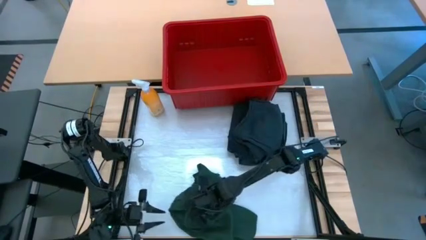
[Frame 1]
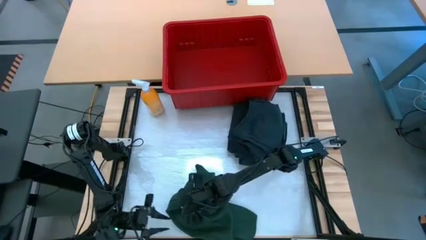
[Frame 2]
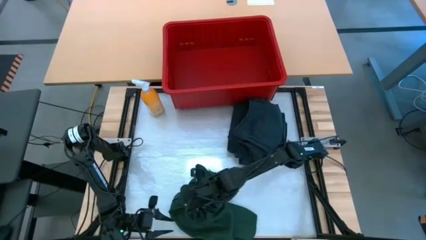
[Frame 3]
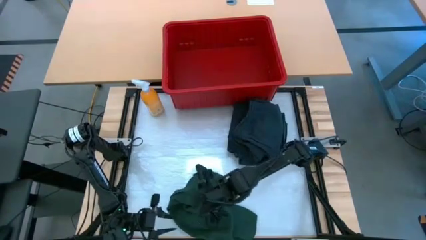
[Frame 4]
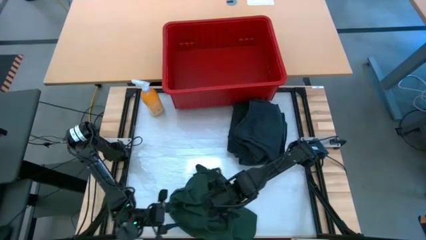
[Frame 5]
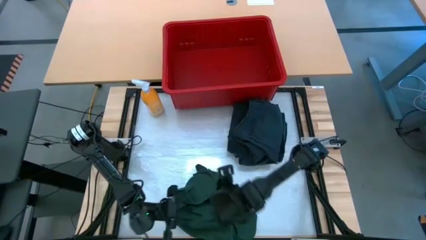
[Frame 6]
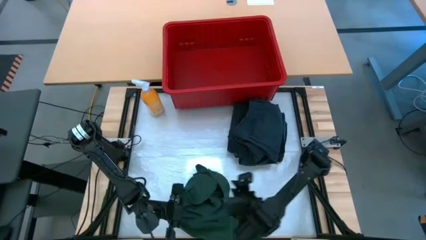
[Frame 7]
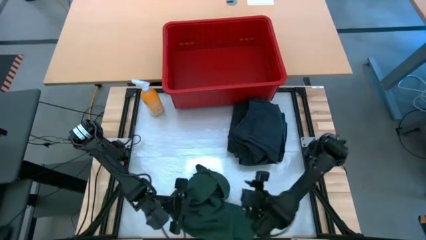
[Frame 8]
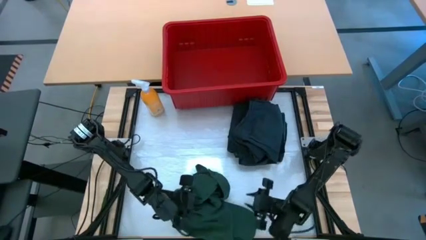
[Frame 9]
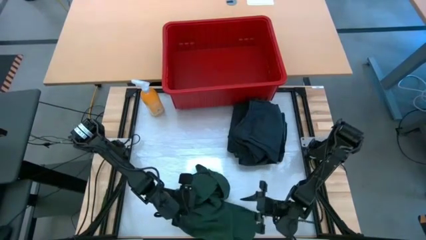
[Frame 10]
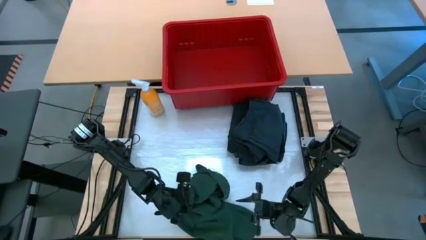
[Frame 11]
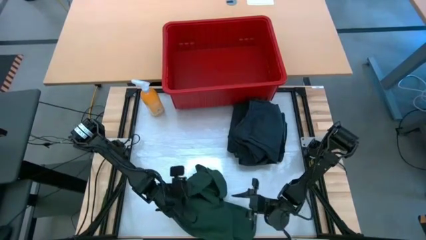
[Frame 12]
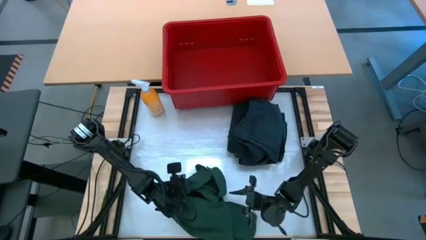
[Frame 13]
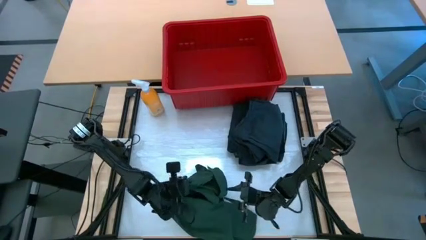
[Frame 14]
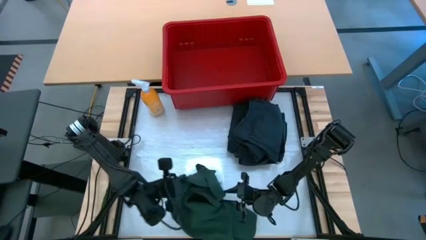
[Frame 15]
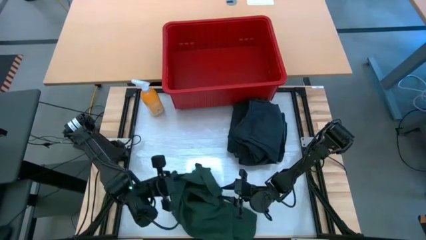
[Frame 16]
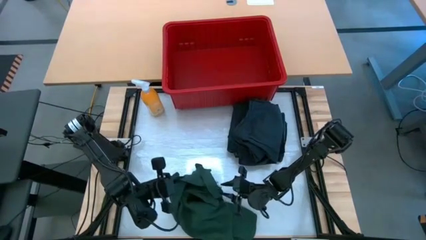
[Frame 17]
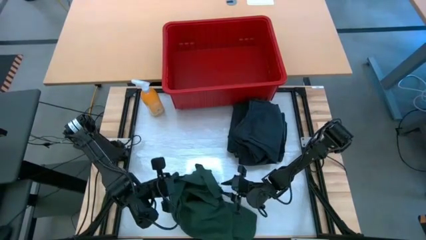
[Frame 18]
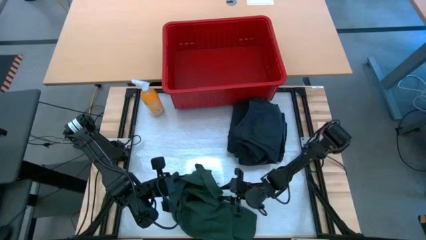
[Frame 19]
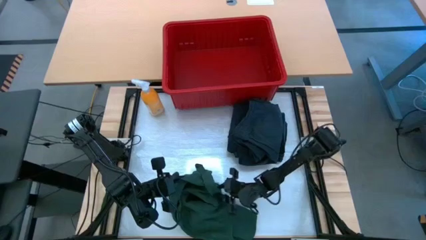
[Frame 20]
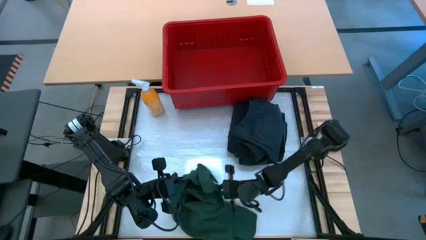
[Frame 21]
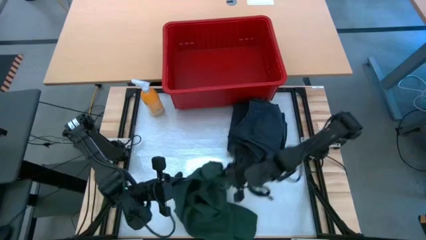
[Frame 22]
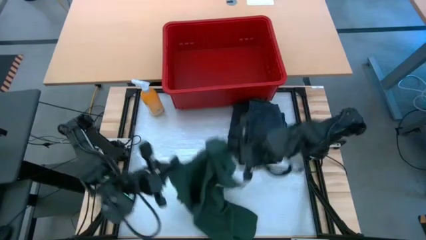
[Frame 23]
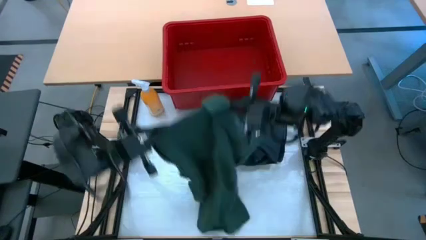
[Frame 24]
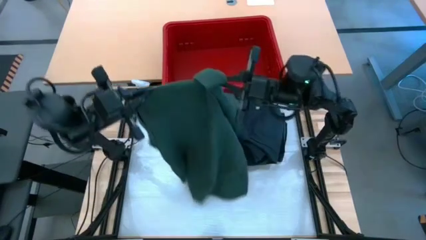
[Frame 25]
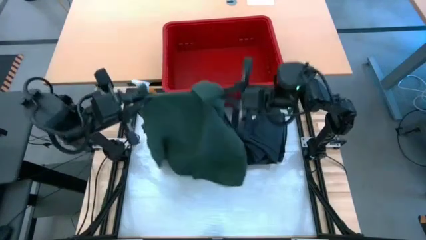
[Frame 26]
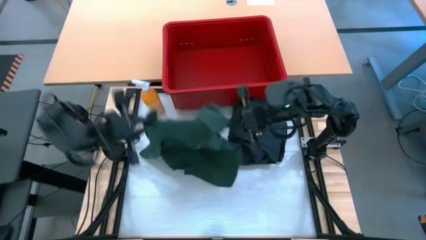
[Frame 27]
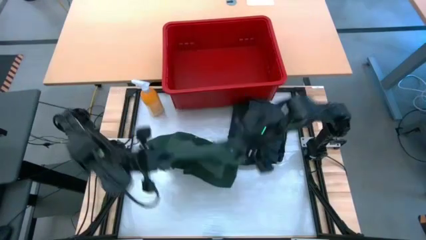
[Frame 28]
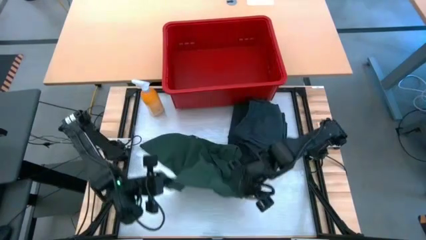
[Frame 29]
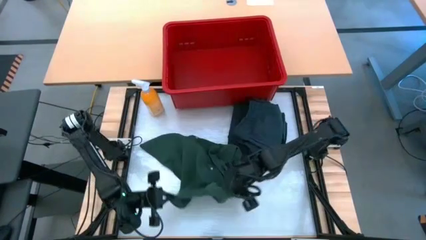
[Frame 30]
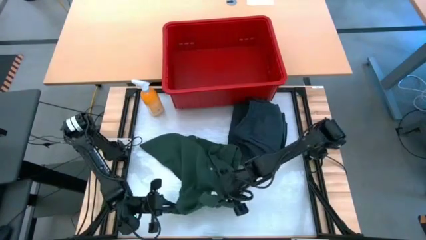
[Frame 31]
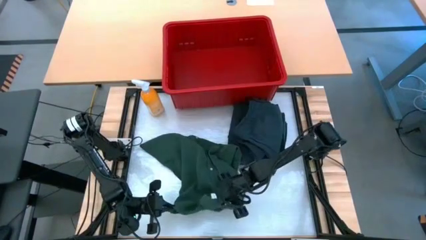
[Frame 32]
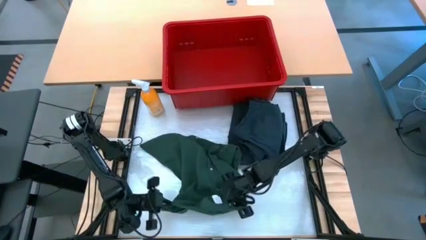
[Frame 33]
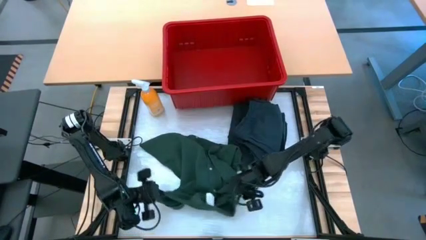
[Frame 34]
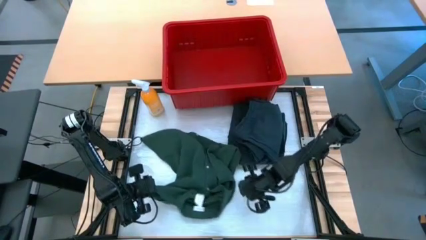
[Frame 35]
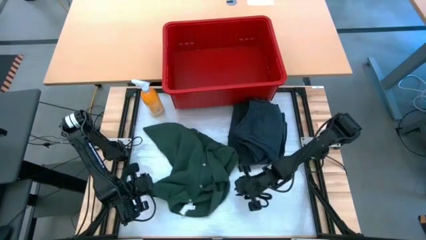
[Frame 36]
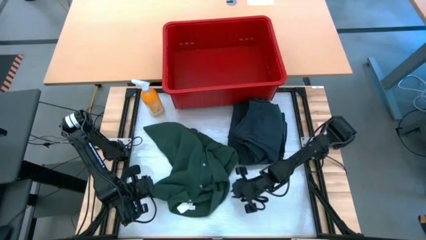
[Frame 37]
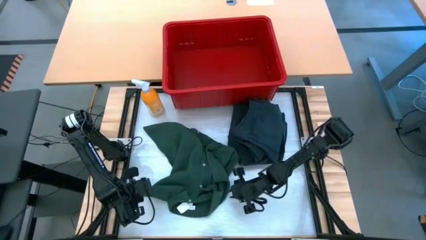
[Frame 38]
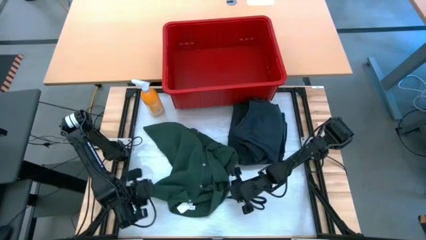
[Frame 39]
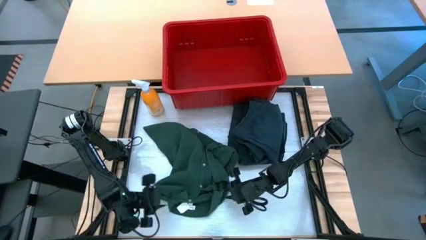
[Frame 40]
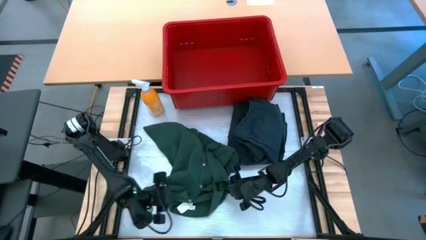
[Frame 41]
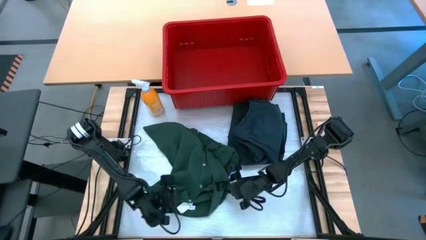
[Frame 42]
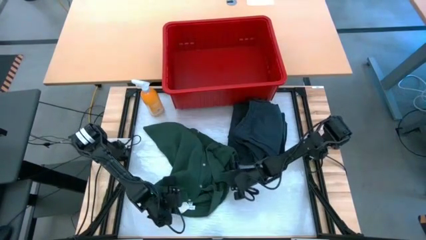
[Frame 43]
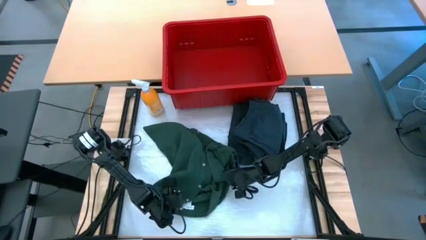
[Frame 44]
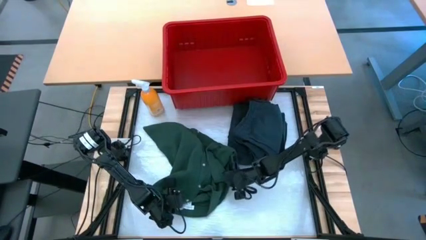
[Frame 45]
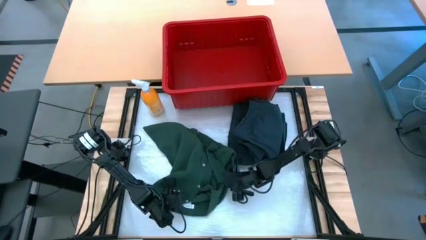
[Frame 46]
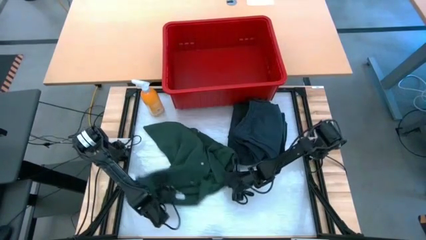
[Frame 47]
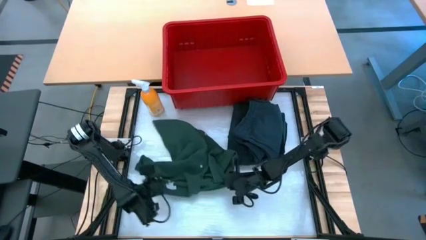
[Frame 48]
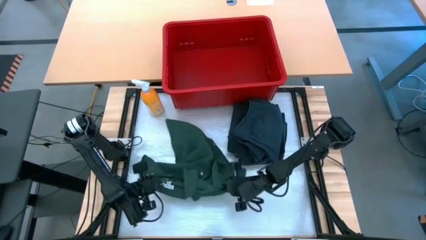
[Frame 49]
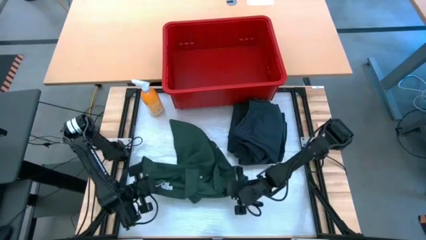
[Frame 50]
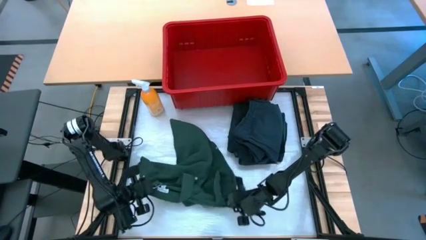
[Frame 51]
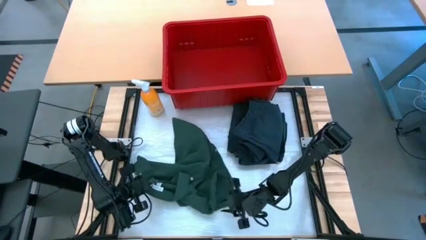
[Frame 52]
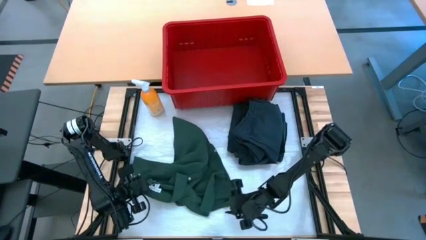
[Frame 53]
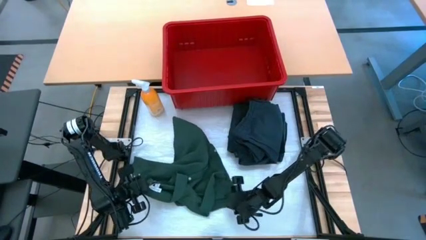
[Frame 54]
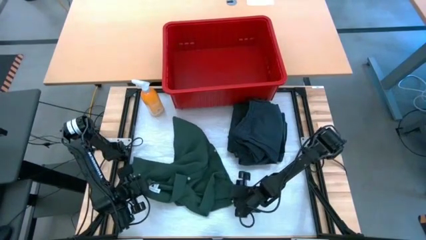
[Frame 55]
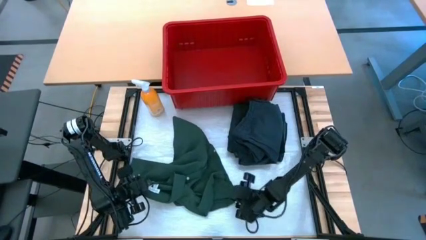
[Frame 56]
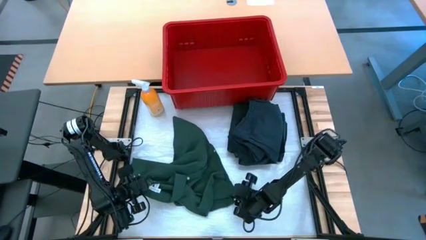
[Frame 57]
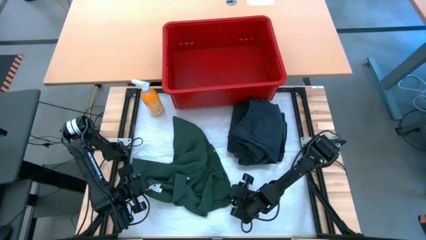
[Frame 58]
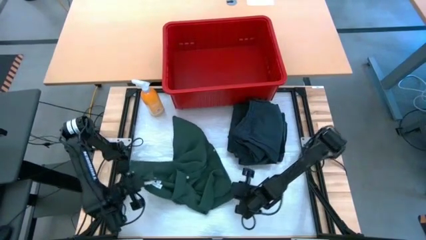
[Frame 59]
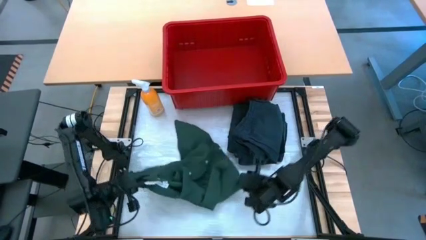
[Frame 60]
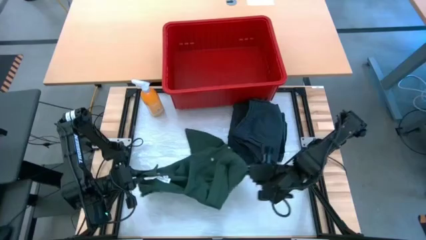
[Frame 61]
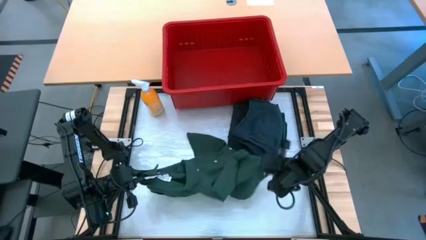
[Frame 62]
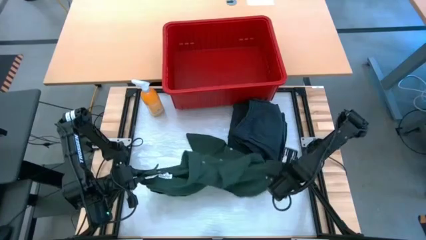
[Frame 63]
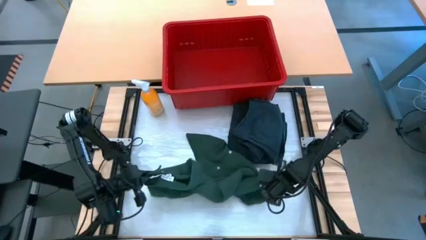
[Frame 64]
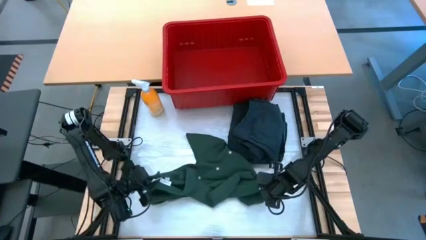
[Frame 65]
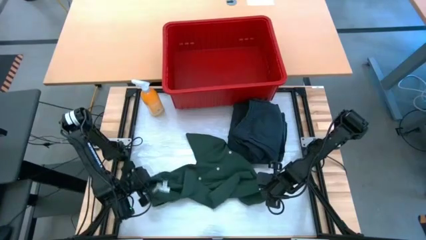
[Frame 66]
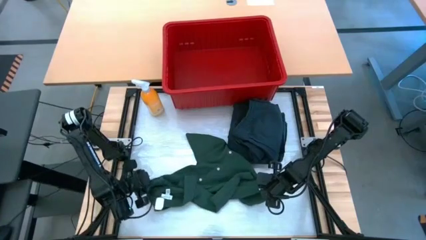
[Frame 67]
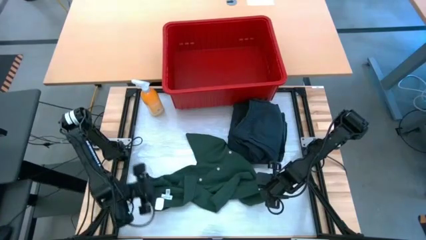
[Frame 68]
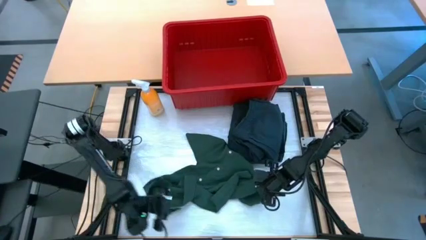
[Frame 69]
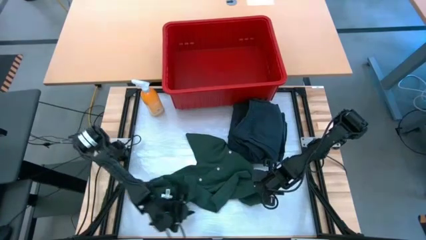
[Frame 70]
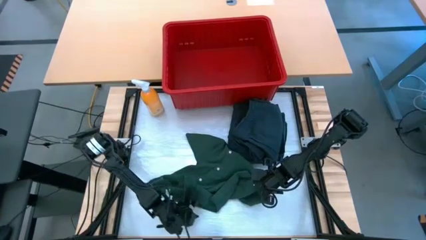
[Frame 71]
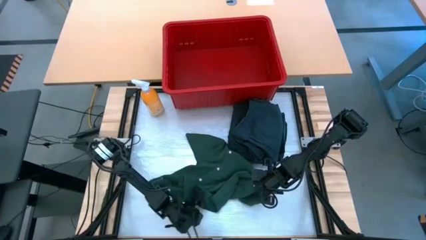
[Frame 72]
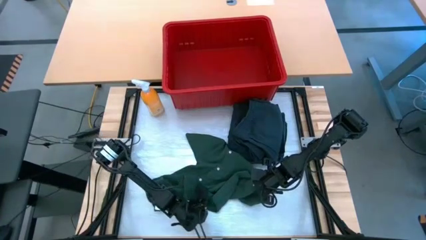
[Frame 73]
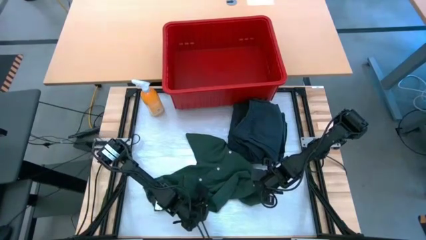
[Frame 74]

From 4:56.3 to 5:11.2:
Task: Fold Laundry from Bin
Fold the green button down shirt
